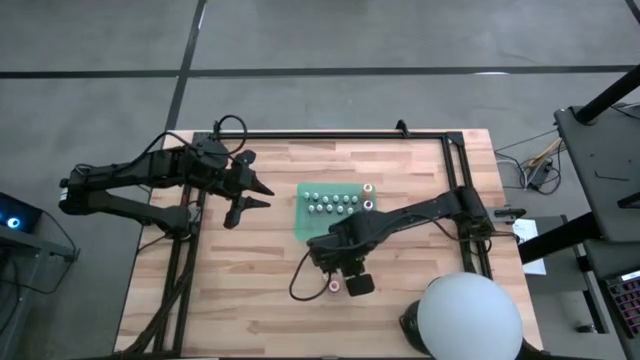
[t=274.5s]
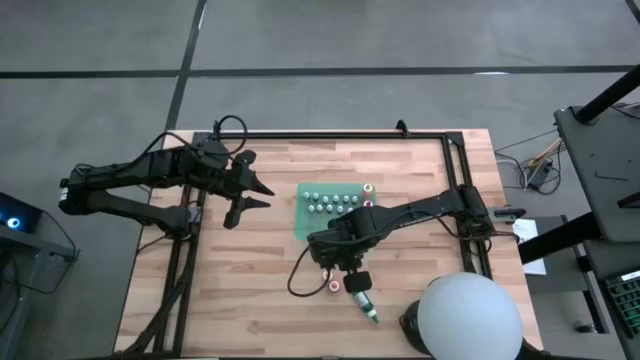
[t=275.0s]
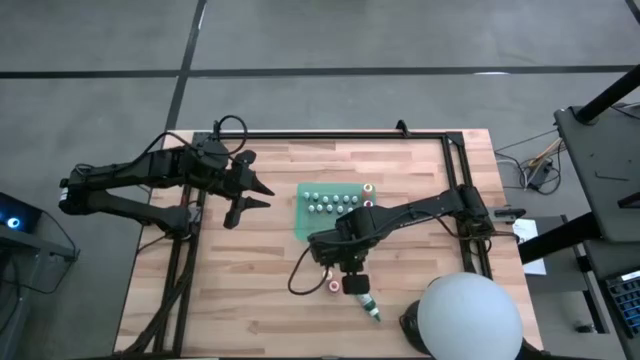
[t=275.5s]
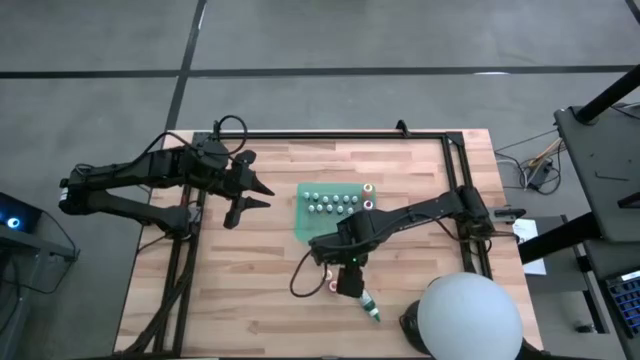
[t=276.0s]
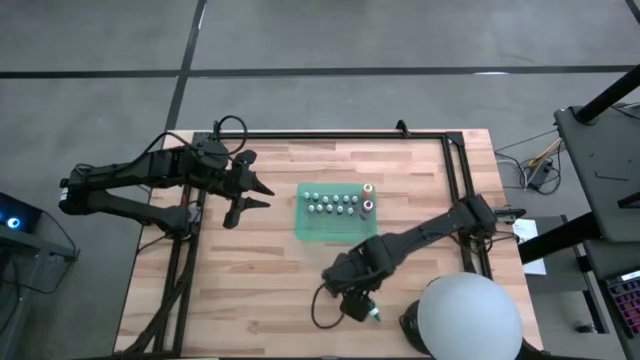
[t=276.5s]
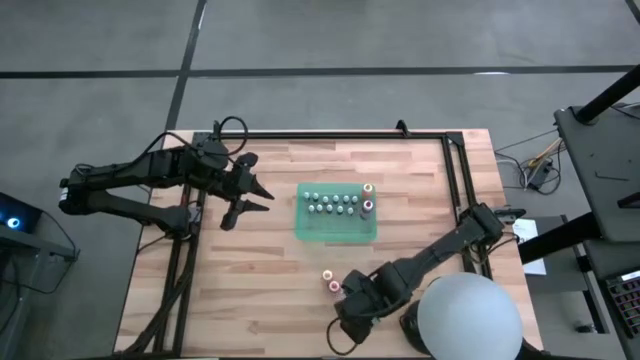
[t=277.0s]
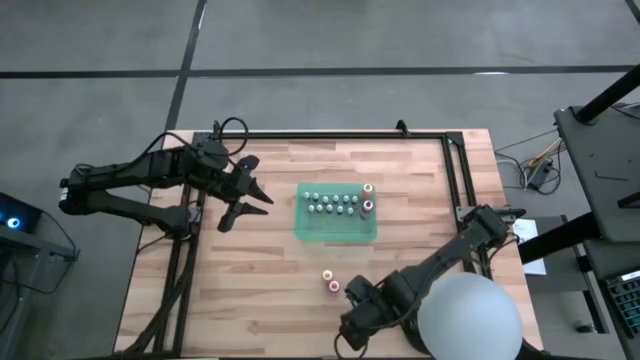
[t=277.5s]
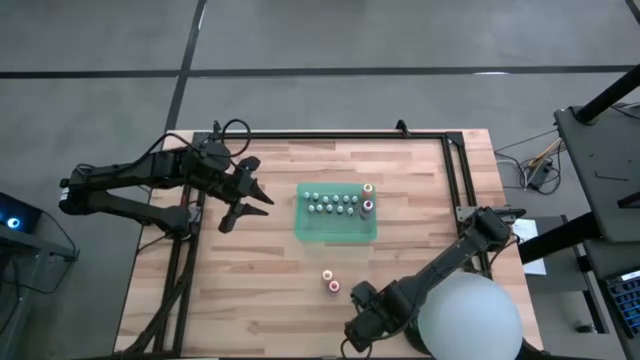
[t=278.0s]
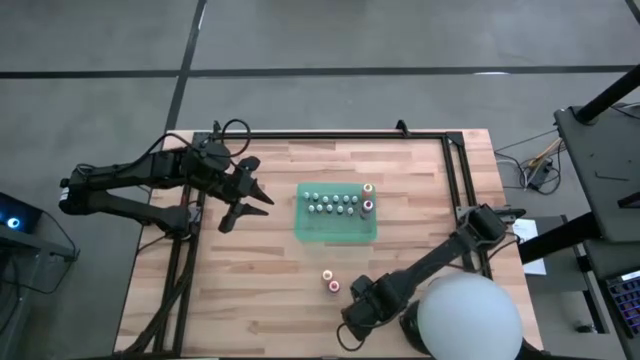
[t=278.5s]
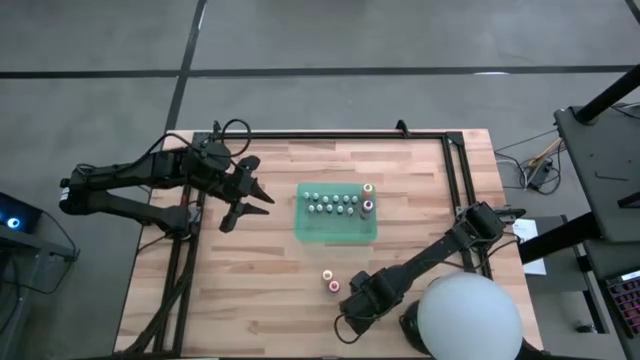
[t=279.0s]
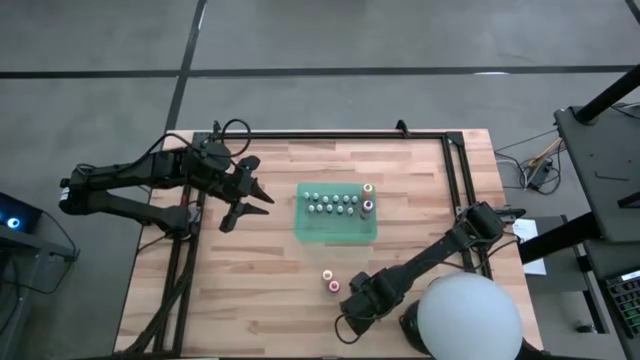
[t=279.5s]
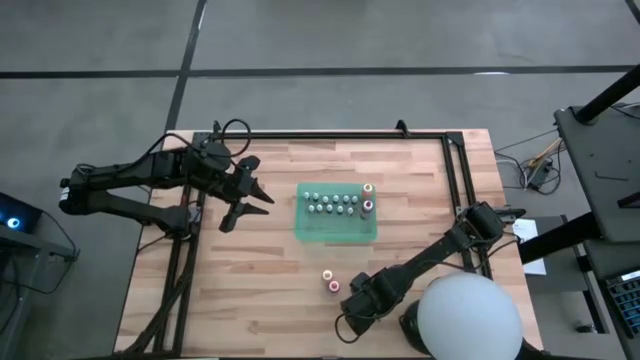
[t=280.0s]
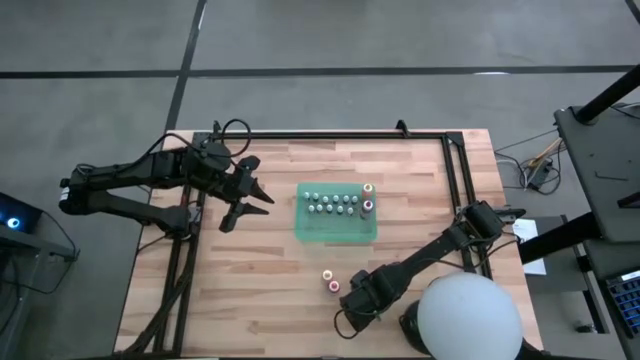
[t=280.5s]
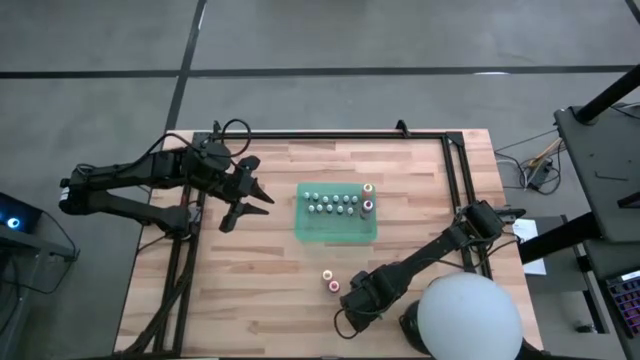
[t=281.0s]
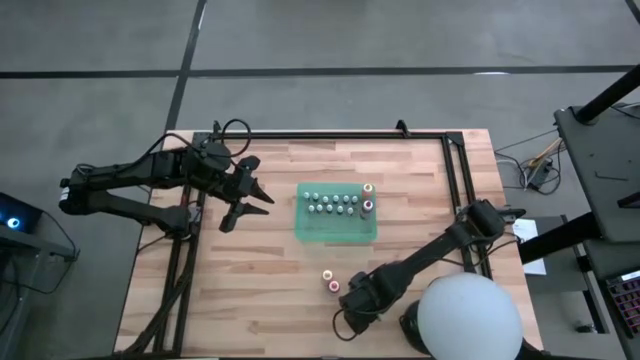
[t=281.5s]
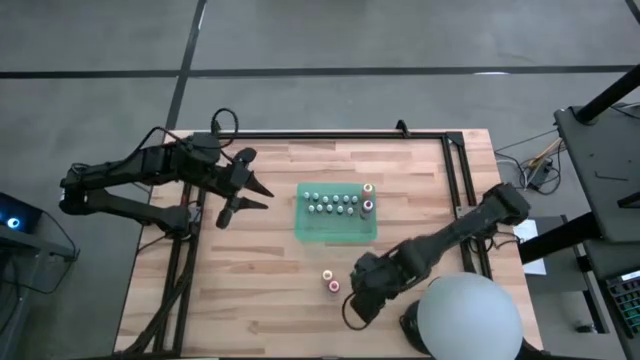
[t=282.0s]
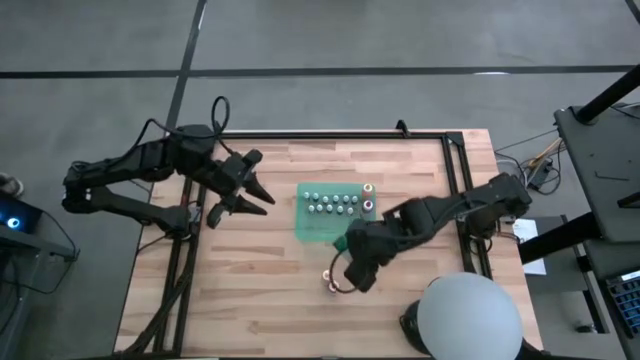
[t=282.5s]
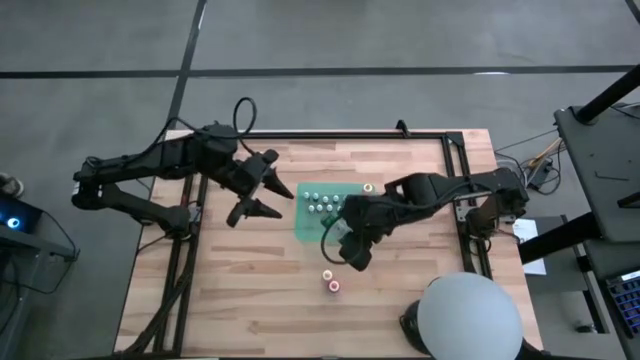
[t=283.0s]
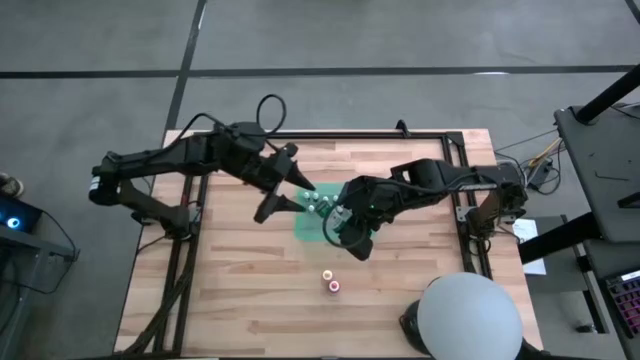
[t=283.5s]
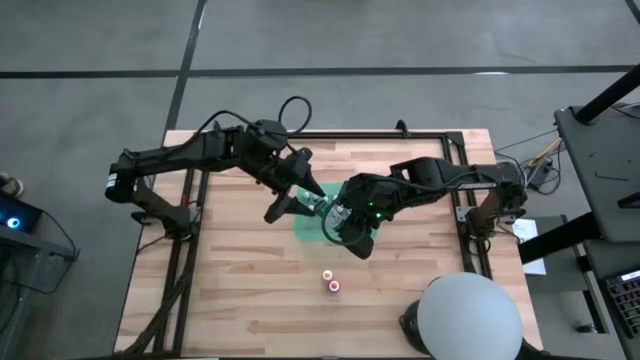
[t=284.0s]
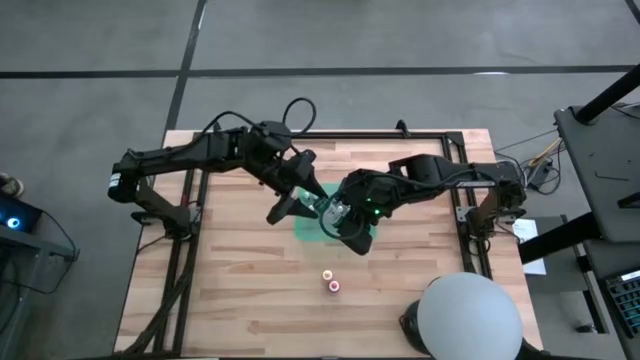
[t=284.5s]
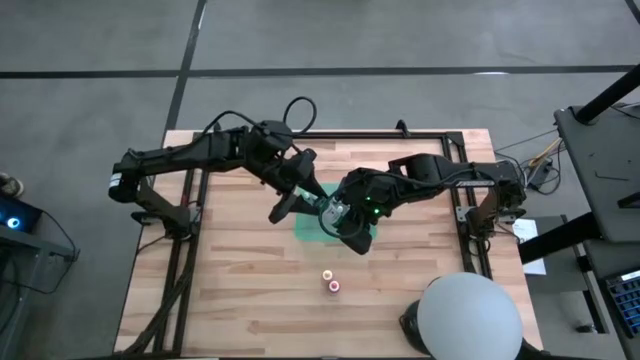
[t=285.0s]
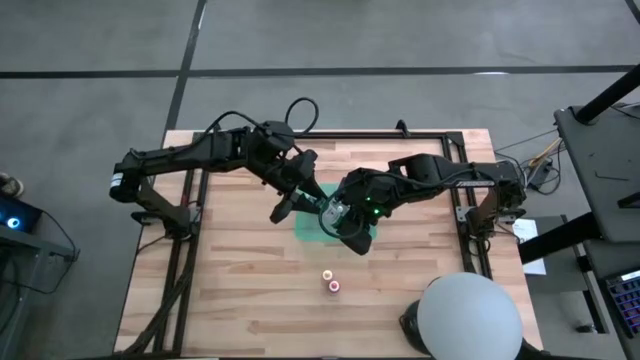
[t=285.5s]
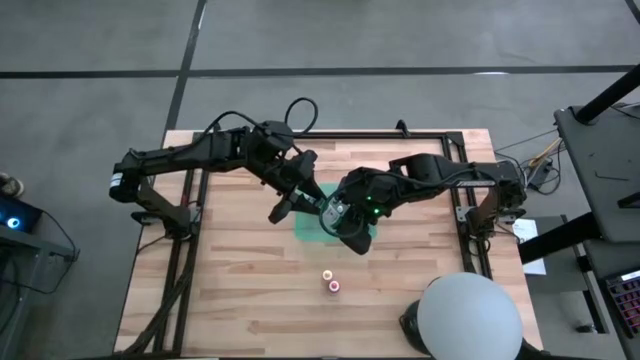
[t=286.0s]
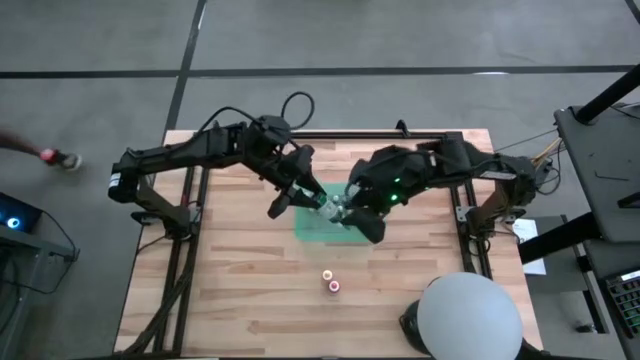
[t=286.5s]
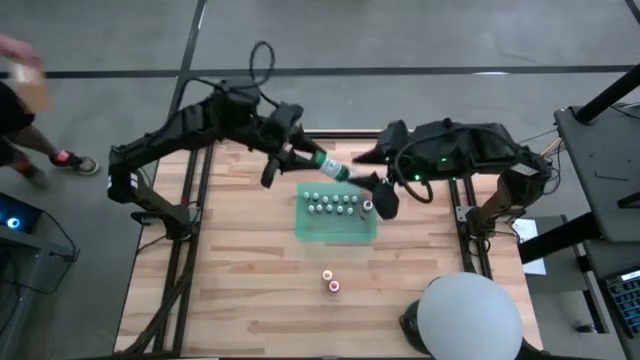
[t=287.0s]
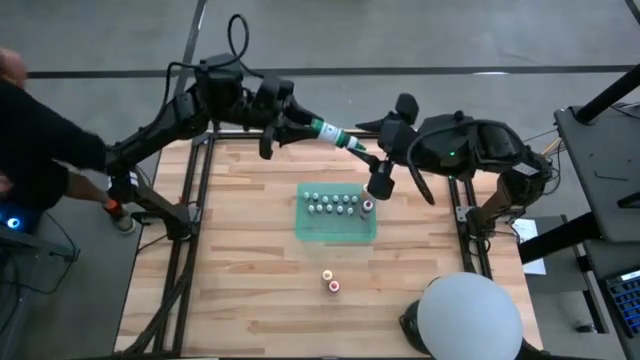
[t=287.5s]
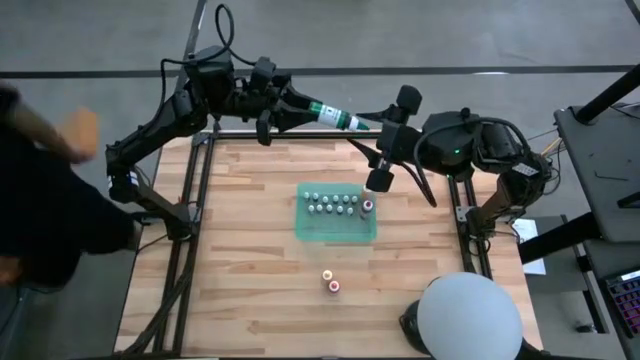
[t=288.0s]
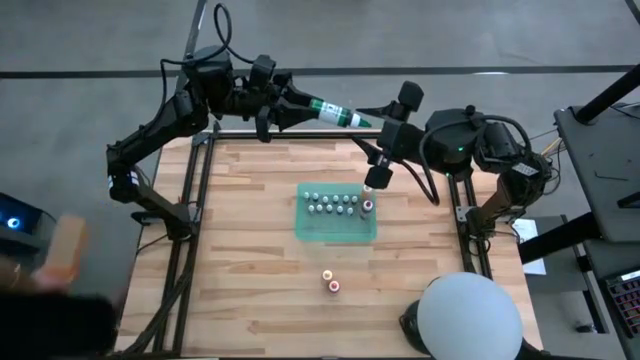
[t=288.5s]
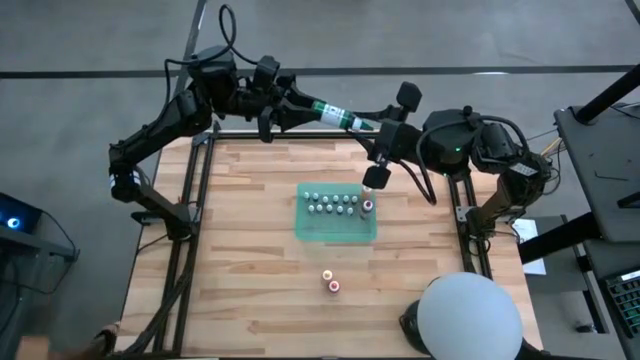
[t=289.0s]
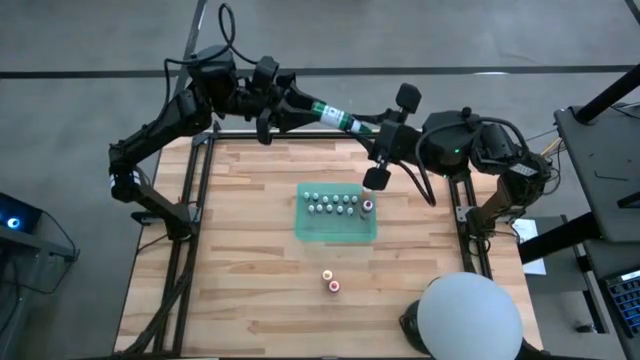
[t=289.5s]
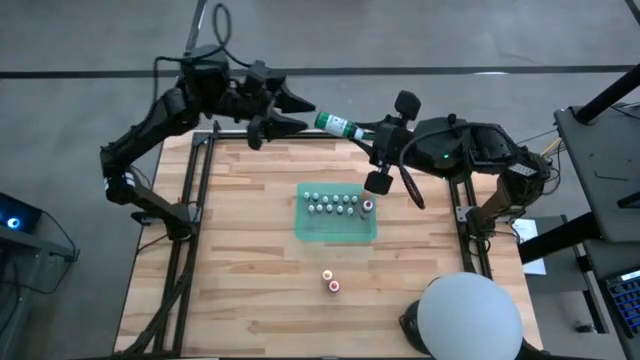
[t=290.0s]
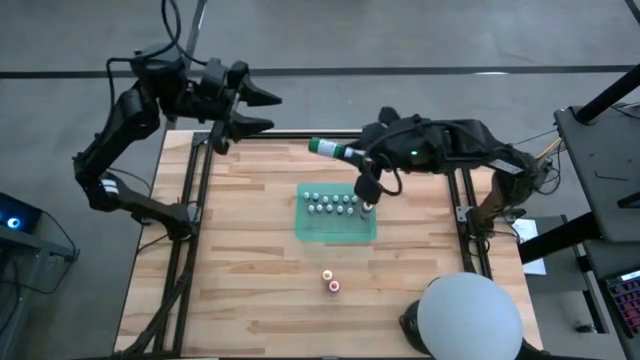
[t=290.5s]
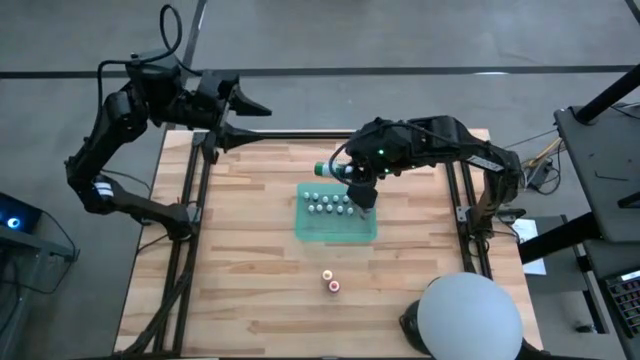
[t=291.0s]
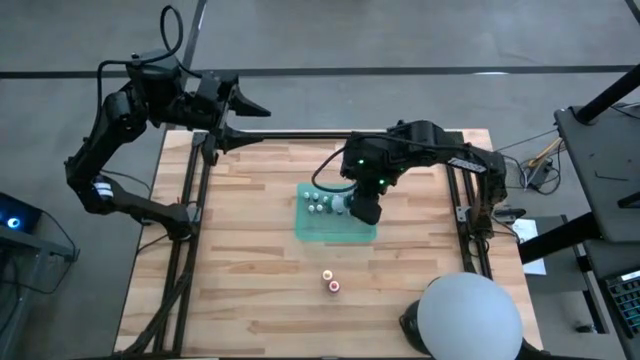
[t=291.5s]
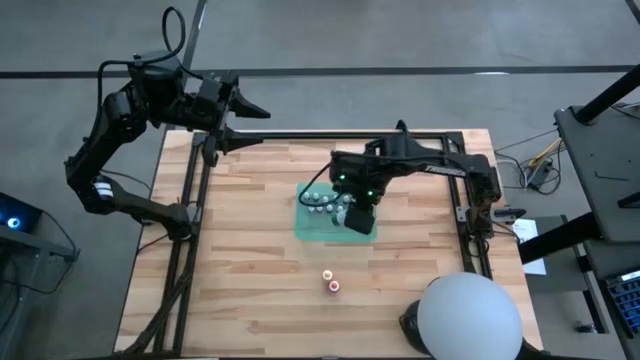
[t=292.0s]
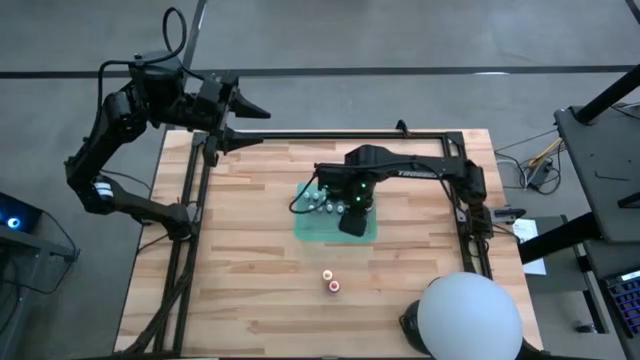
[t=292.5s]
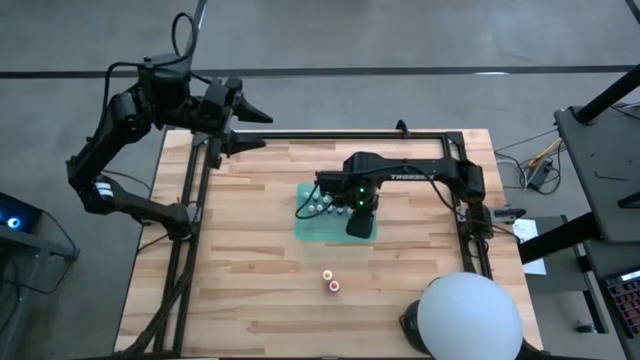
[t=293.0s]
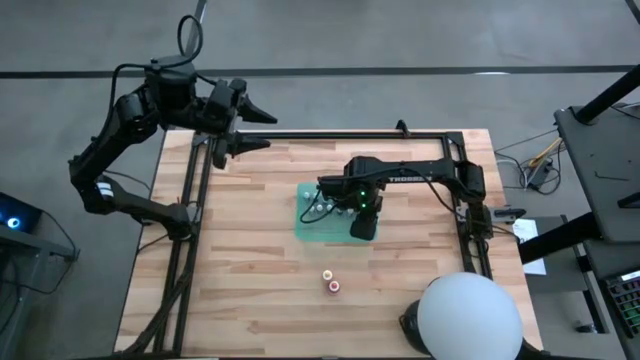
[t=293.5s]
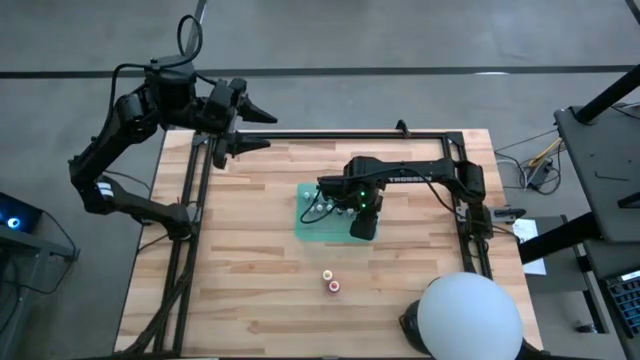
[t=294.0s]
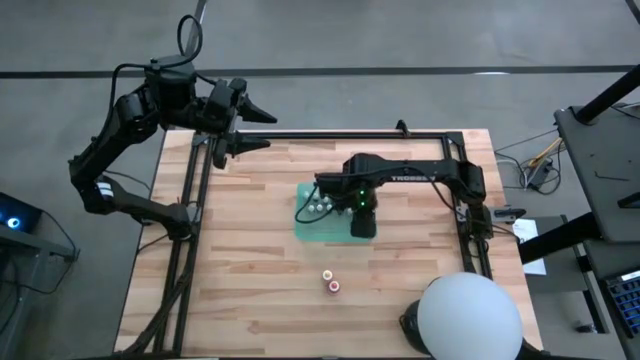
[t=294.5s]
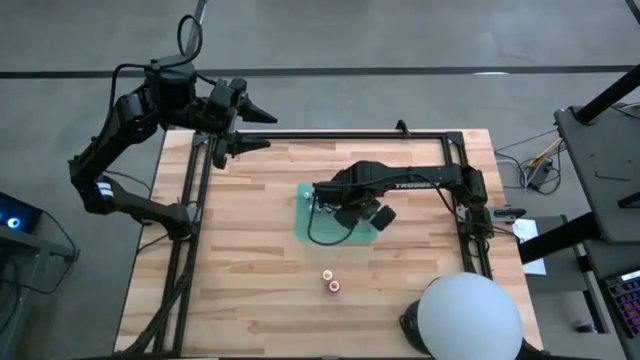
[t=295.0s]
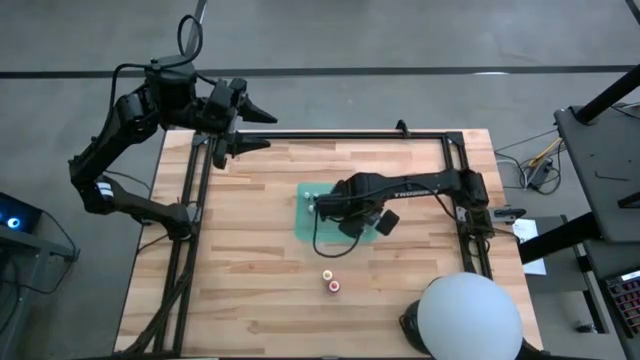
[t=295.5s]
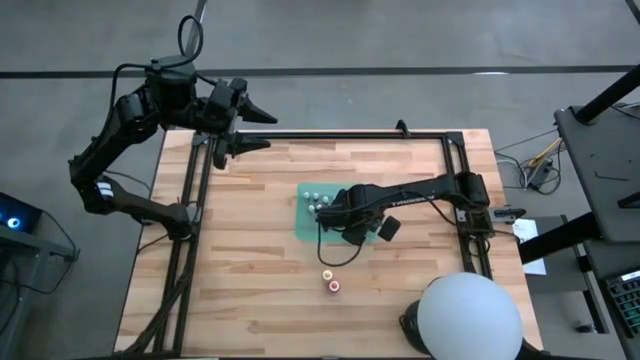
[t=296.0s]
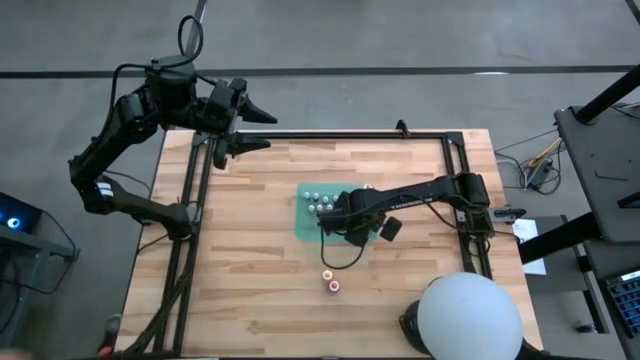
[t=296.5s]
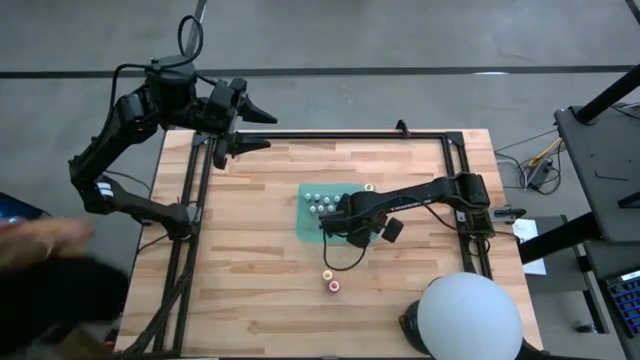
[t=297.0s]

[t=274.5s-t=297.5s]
Task: Pick & Place food coloring
Put the big green food coloring bottle into the green container
